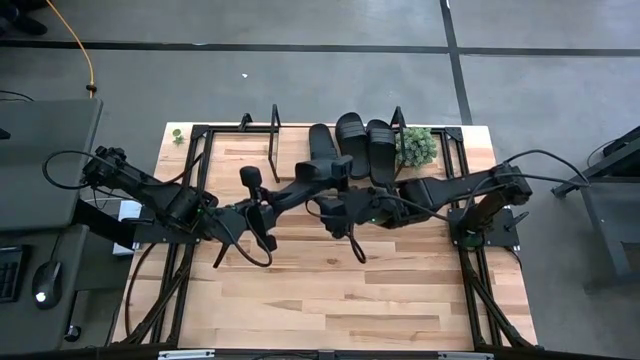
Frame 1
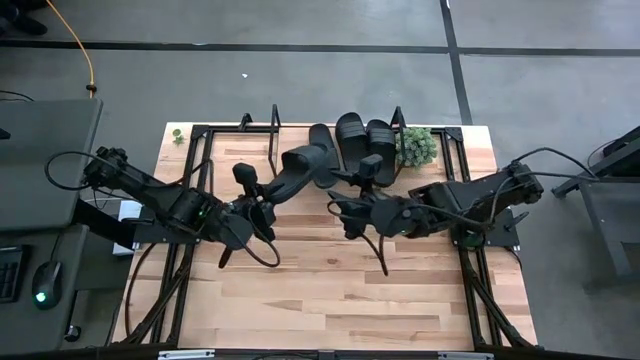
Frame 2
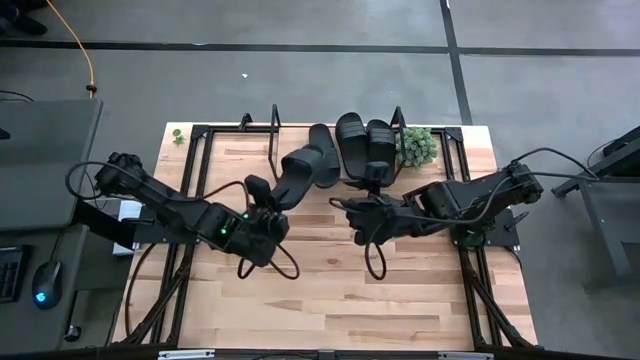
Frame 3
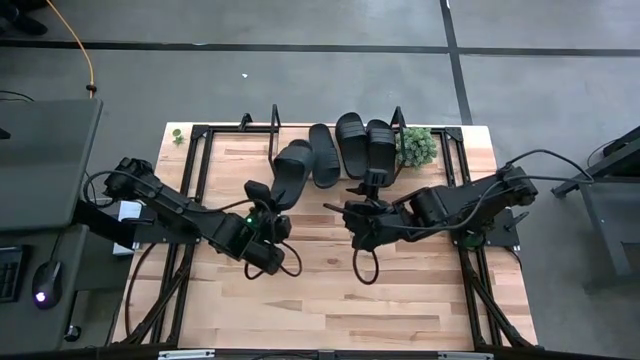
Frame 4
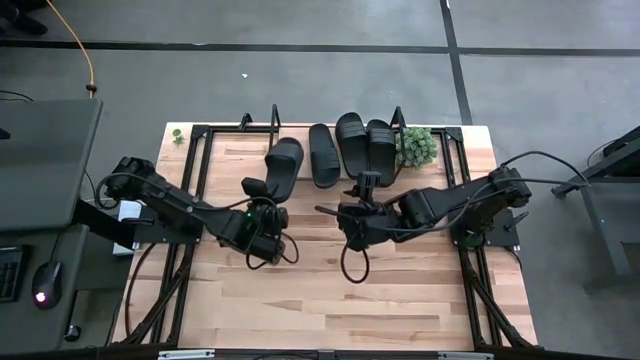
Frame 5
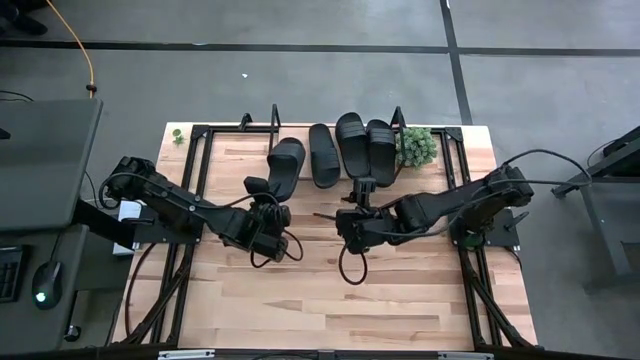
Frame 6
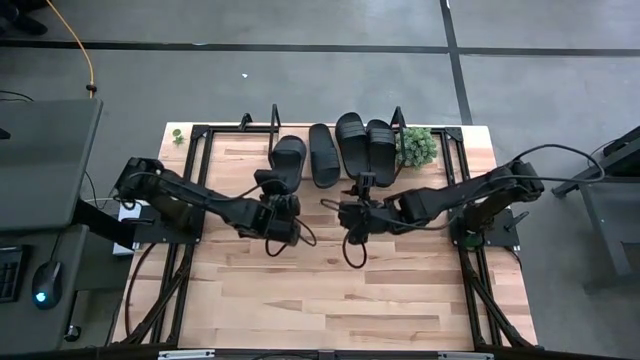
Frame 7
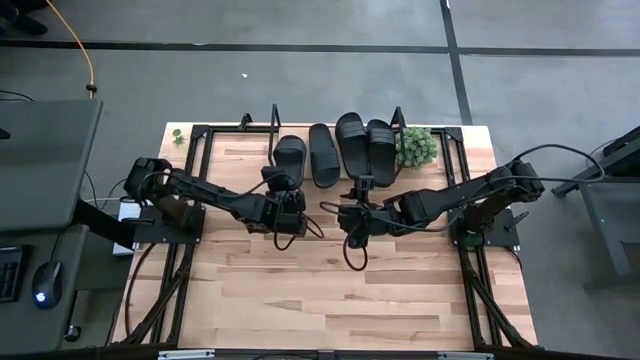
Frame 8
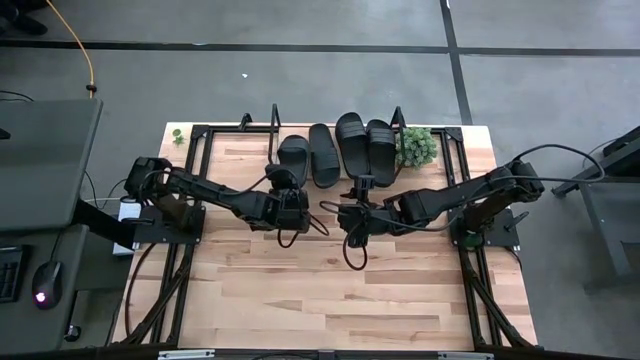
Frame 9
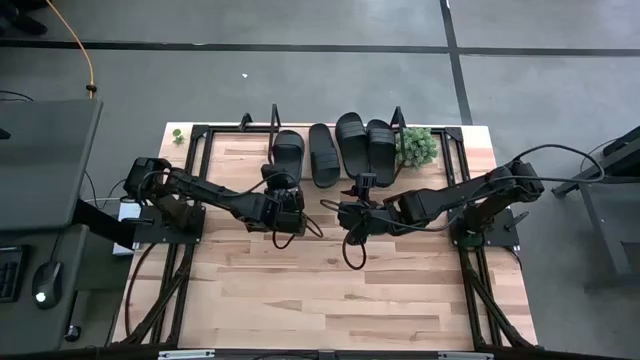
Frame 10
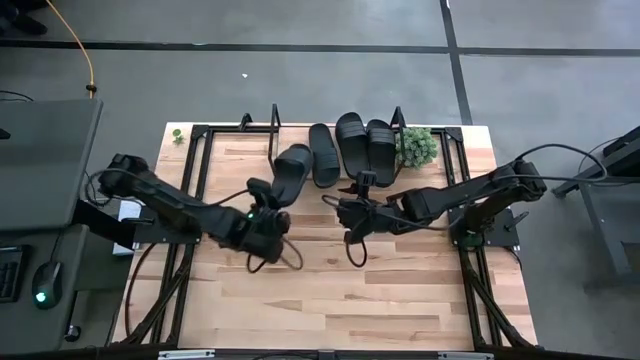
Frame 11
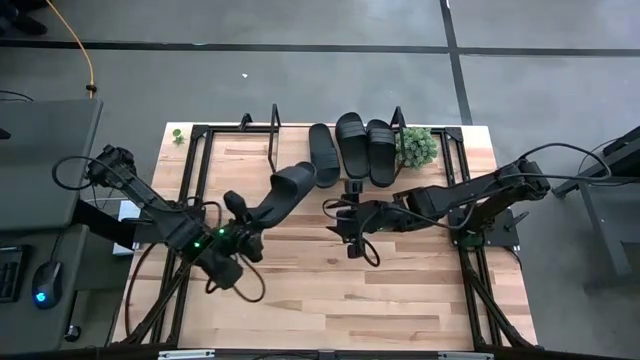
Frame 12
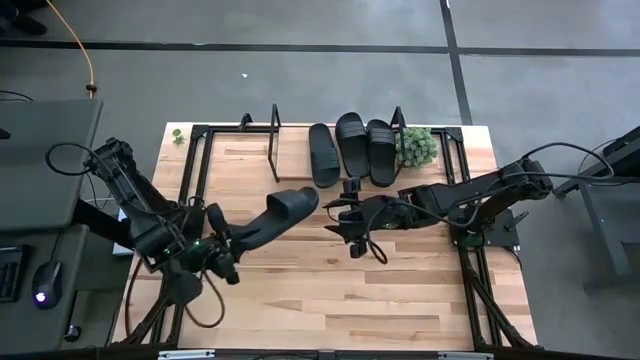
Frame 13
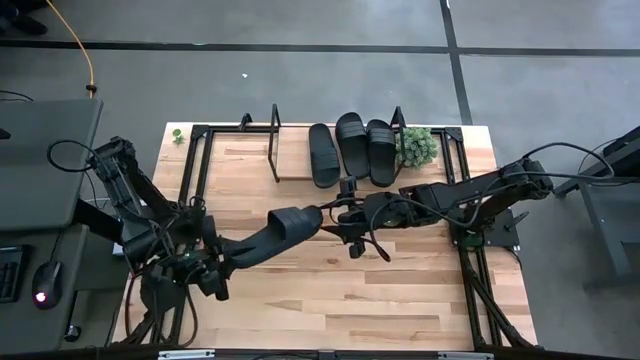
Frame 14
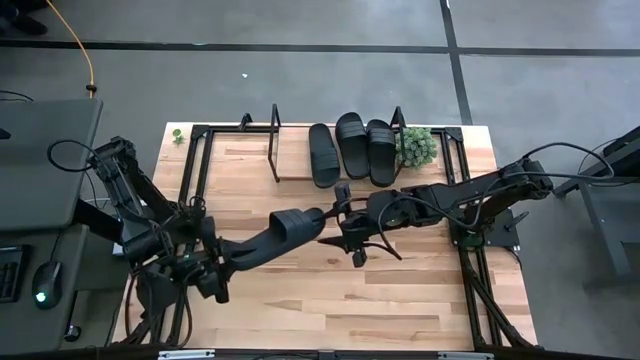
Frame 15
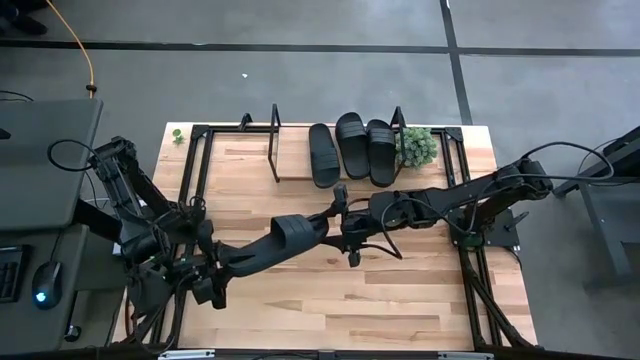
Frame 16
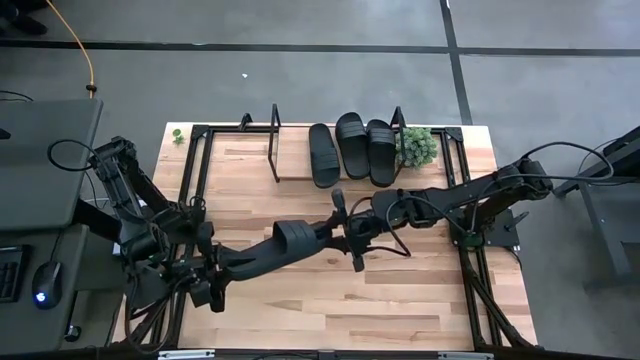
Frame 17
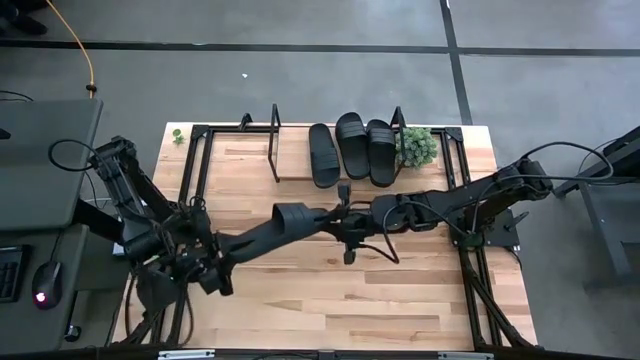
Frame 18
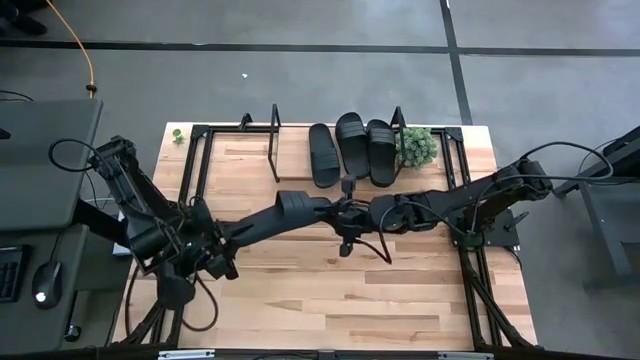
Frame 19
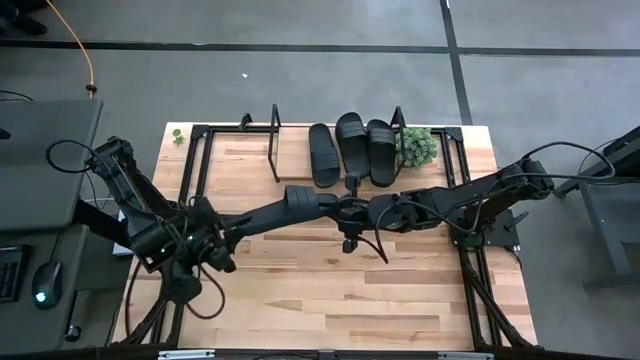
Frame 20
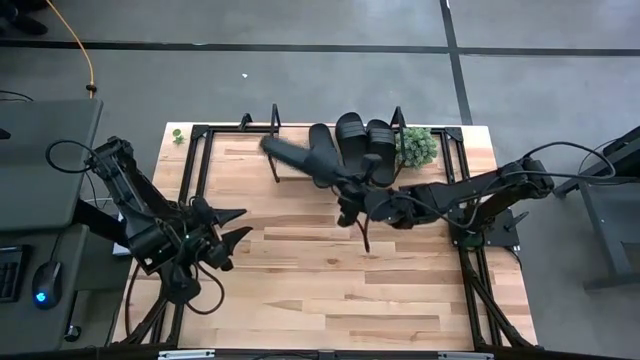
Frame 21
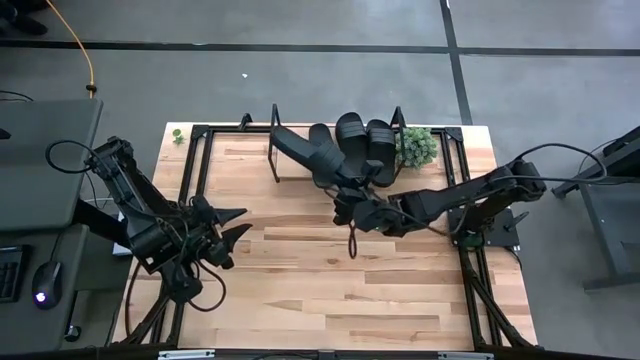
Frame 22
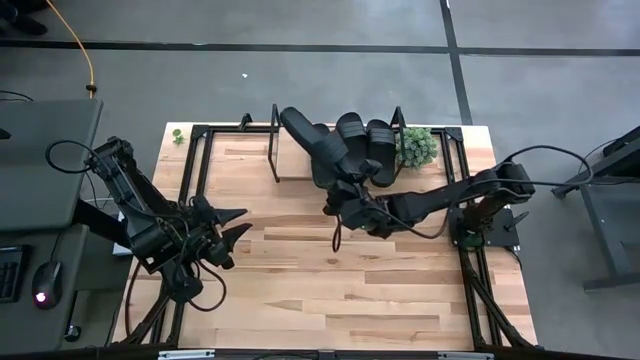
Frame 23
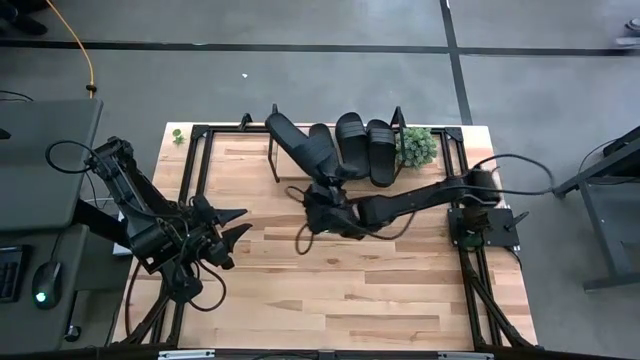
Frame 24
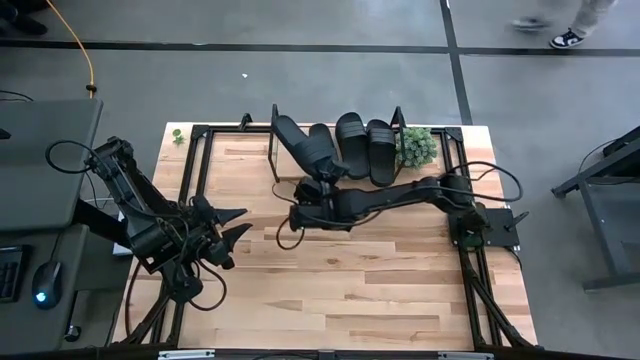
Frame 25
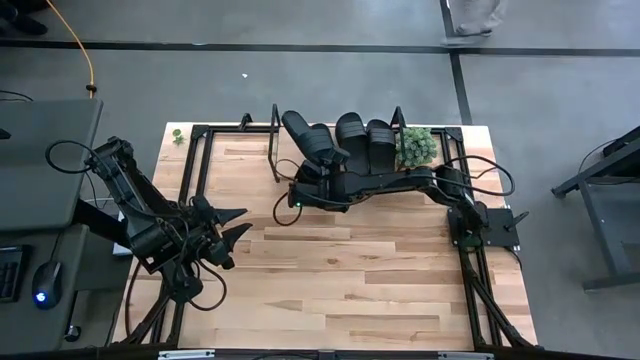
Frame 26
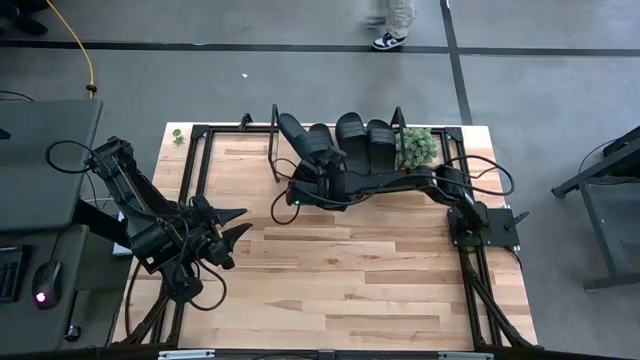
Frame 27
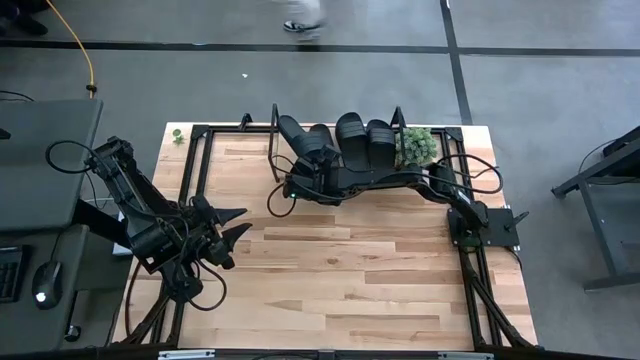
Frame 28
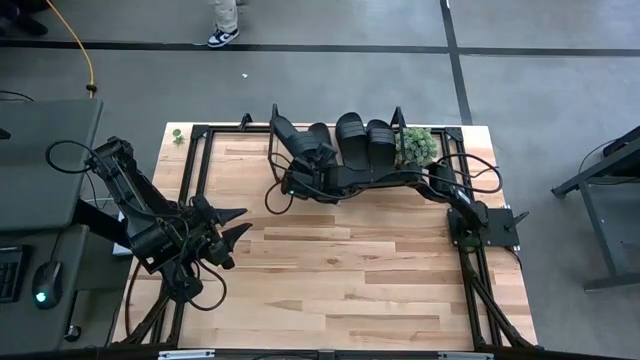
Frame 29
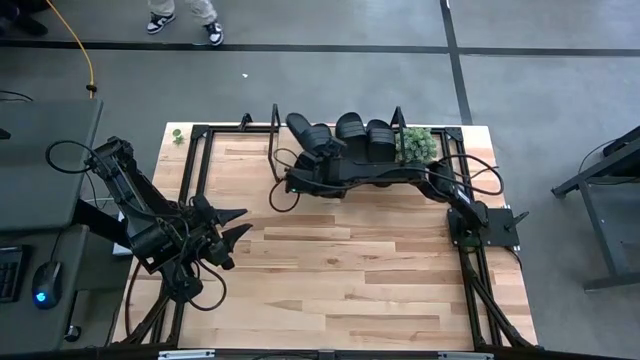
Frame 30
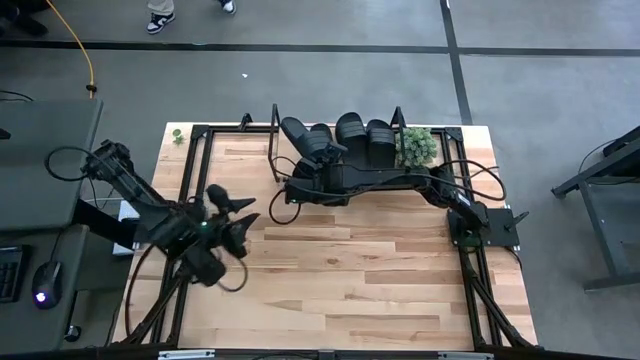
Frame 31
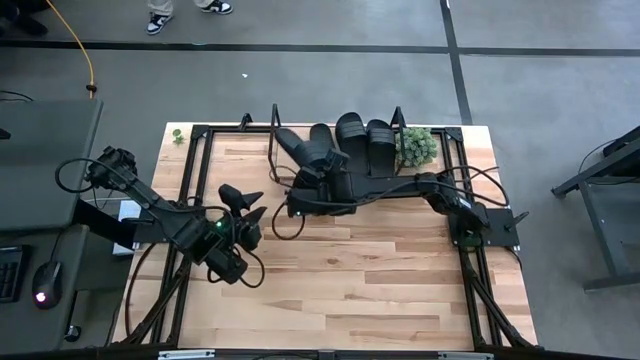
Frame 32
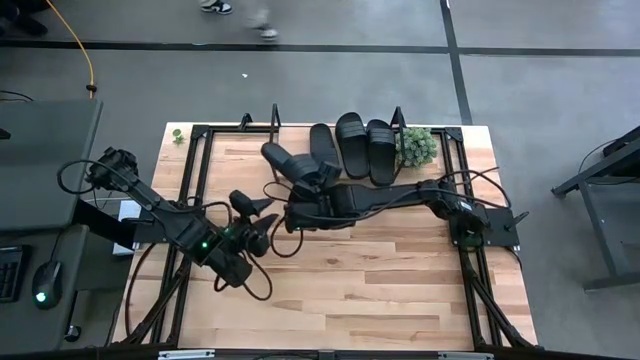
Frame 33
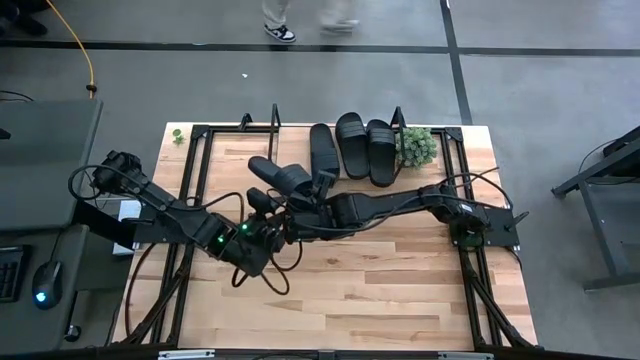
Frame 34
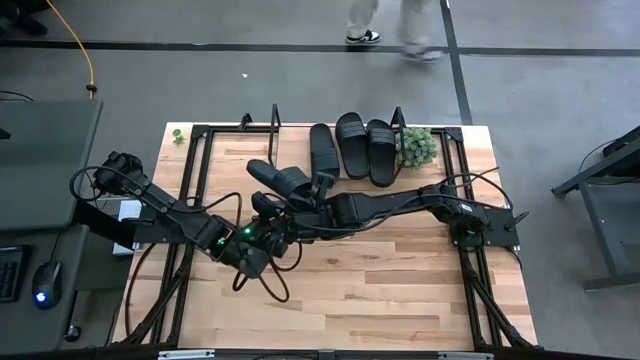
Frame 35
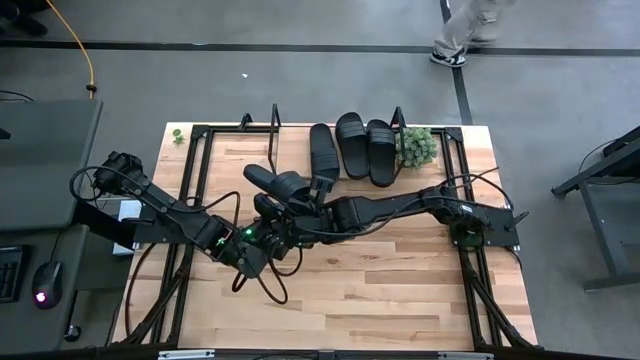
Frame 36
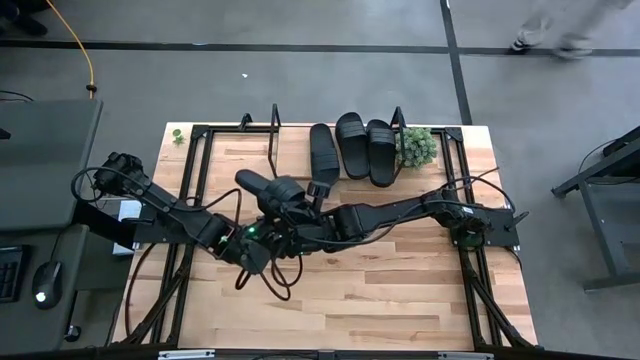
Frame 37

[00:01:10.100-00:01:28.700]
Task: Pick and place slides into the shelf
Put the black slipper on the shelf
